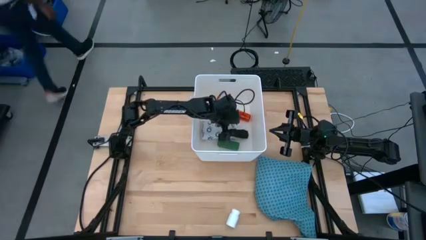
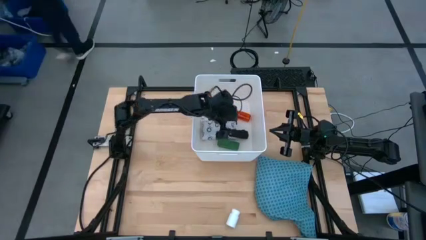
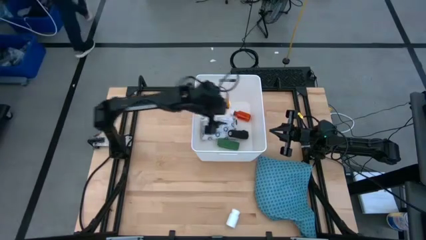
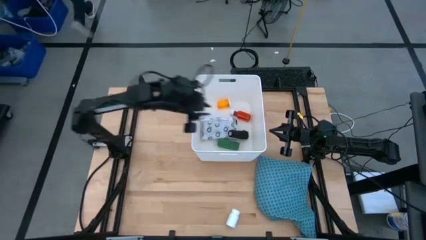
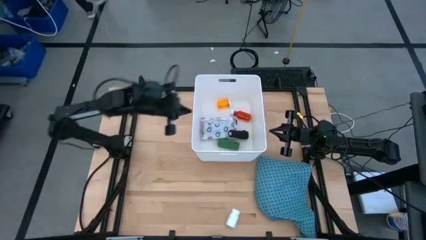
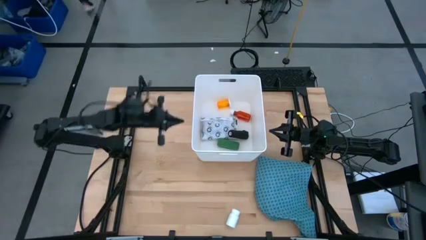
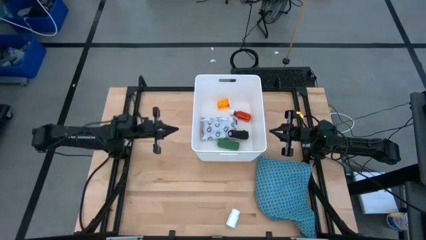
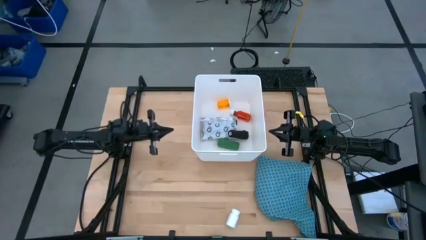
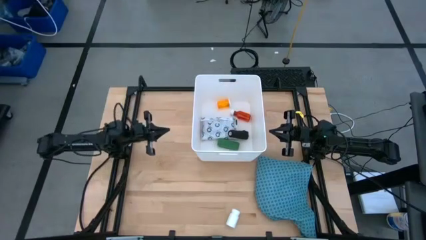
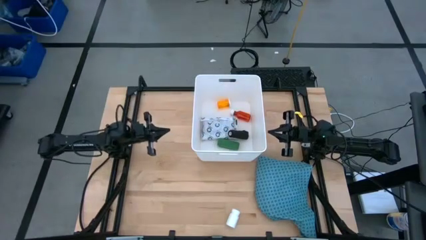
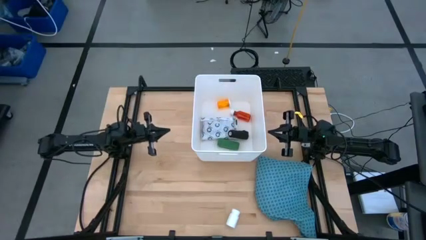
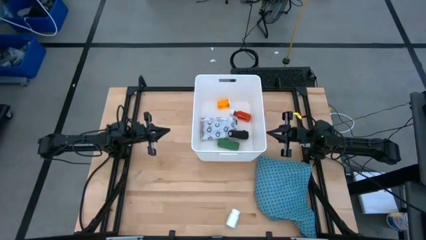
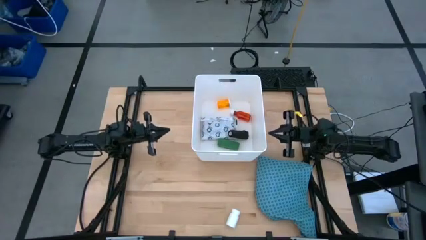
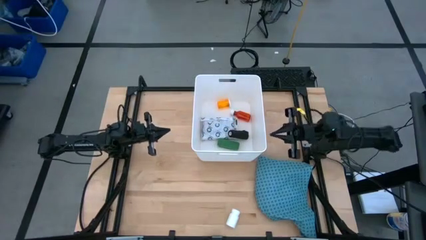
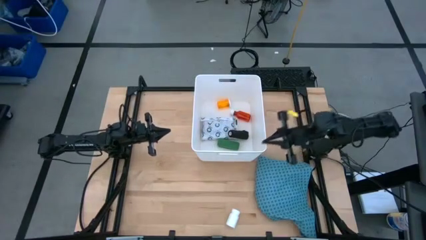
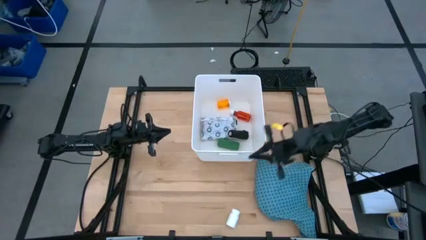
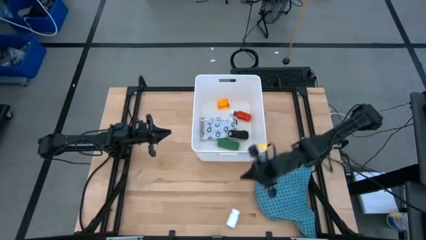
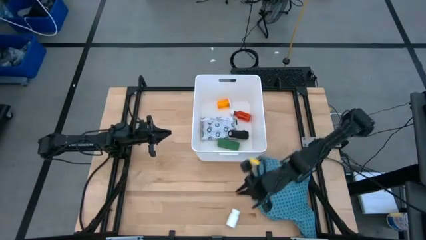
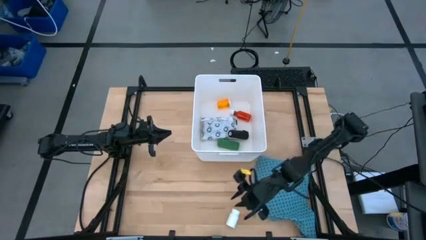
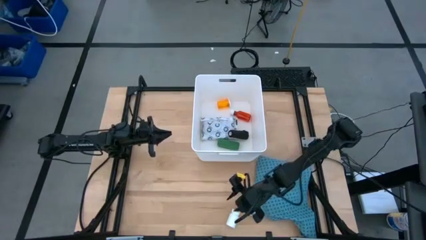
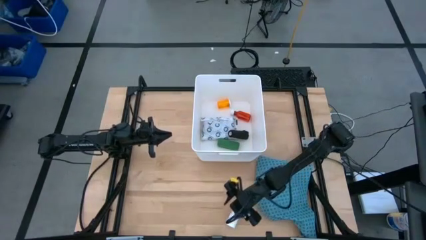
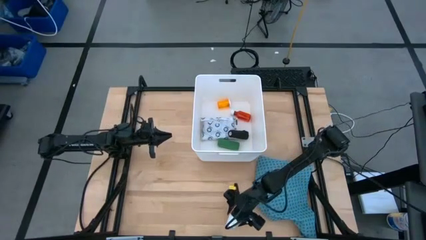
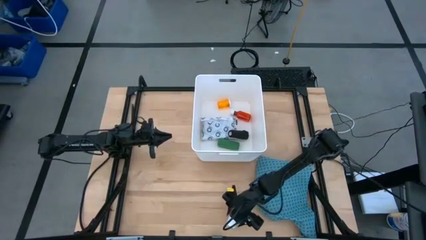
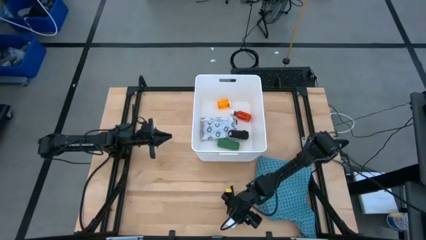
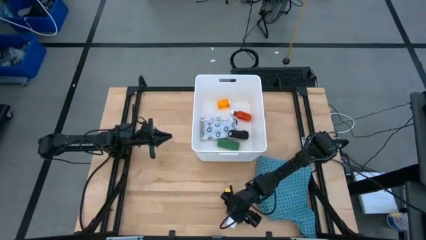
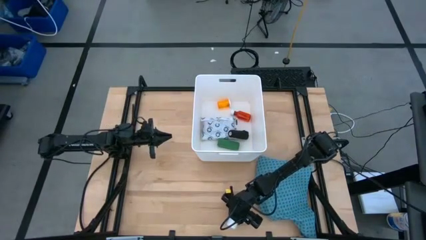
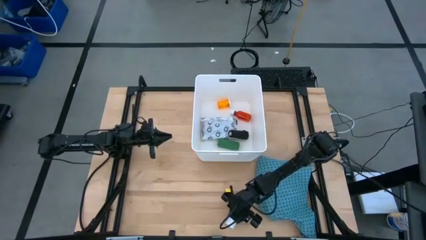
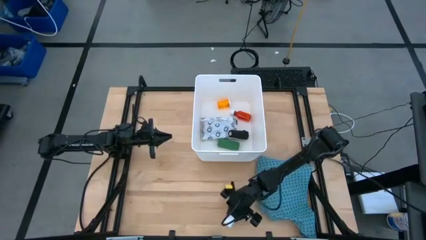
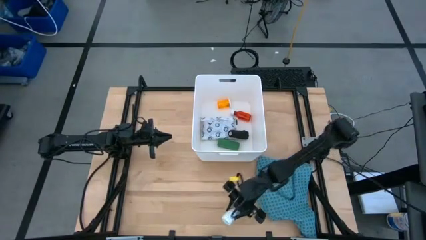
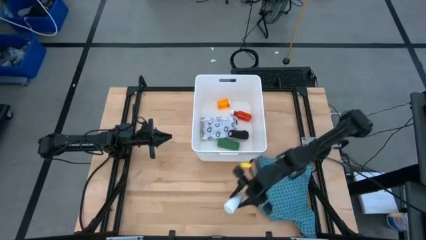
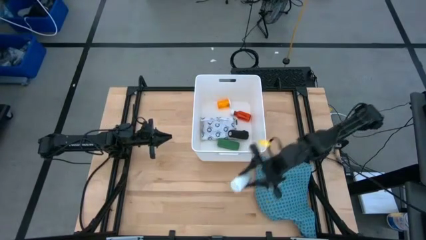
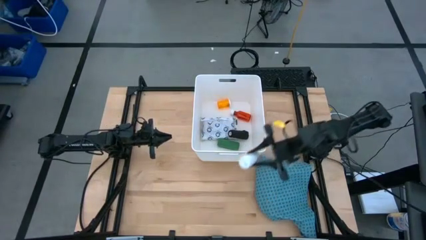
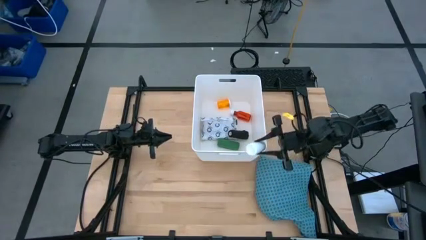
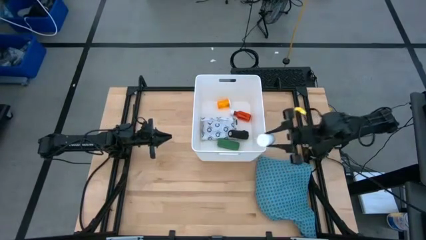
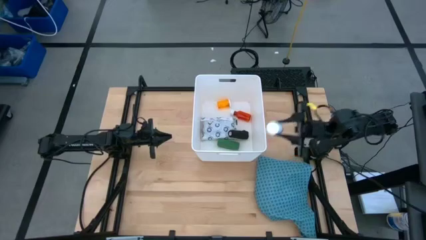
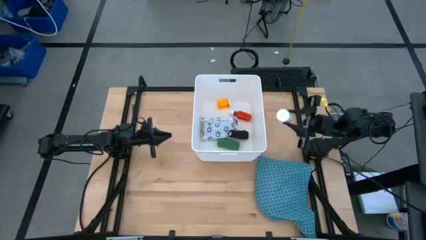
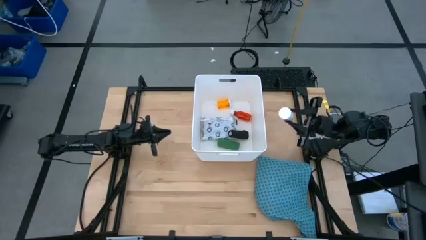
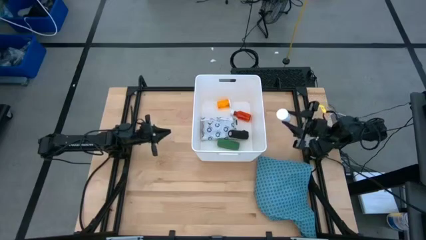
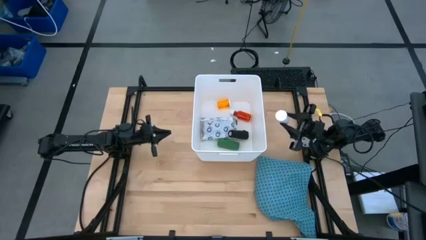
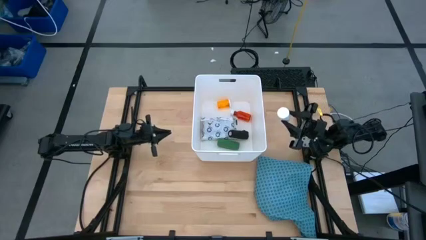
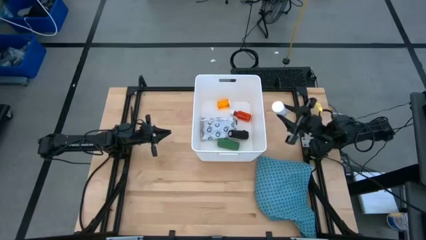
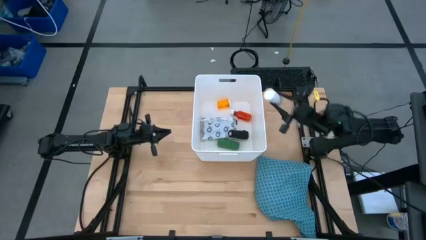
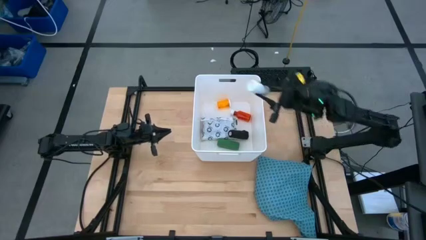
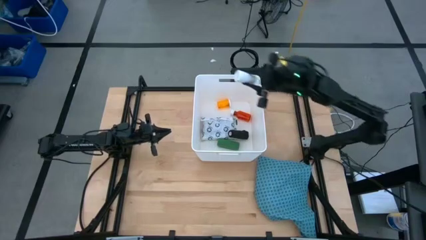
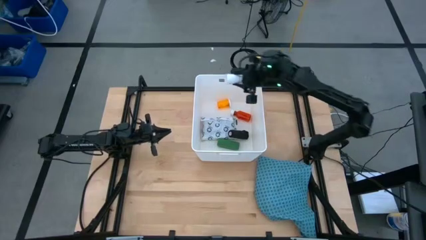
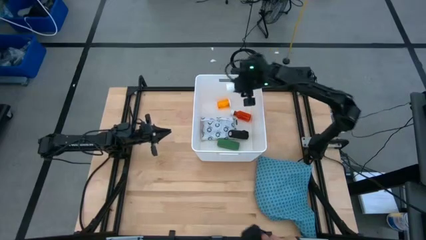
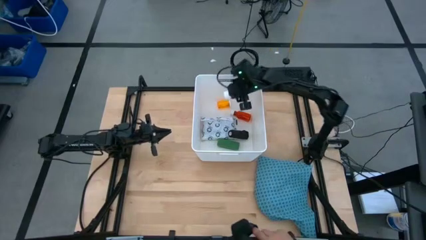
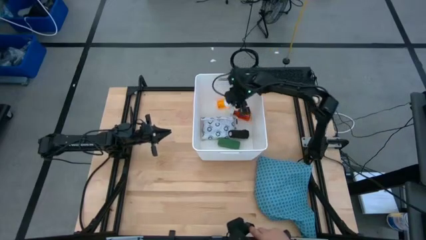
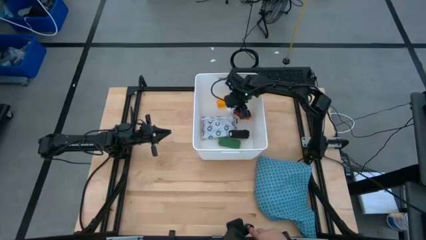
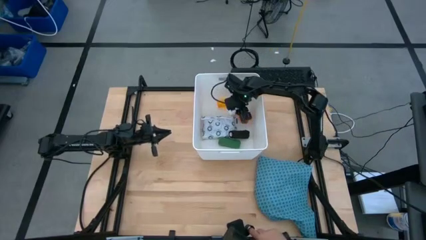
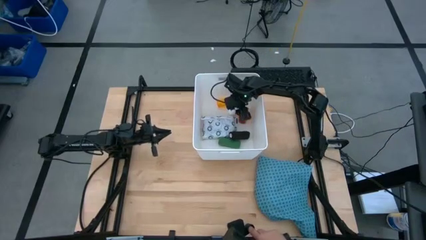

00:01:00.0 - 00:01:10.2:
Task: Pick & place medical supplies in basket/bin
Put the white pill bottle into the white bin

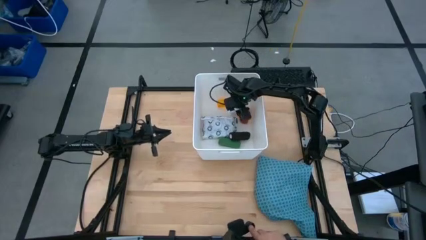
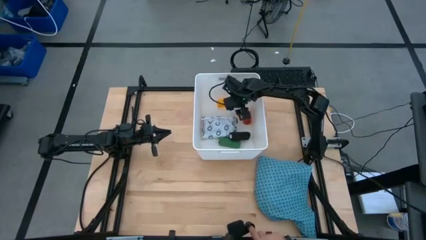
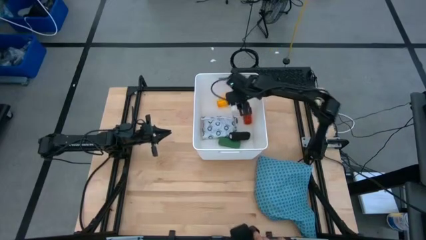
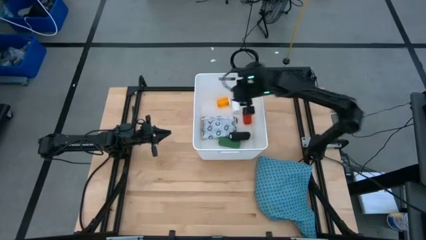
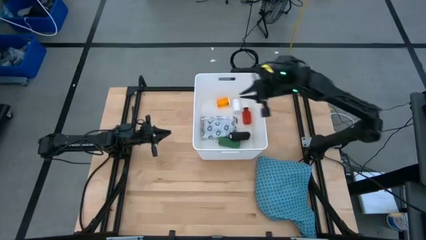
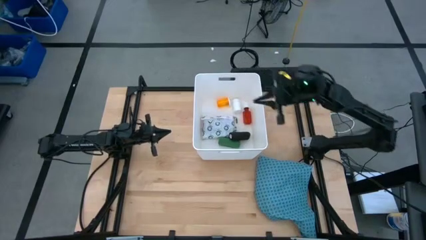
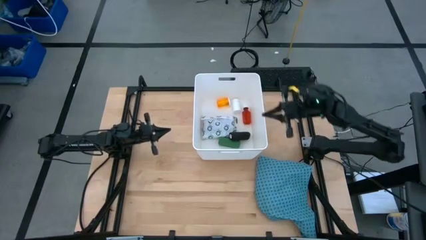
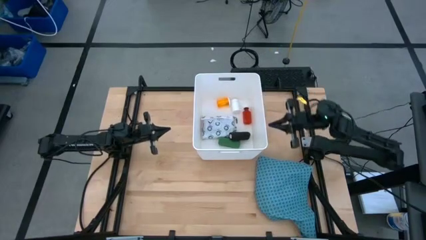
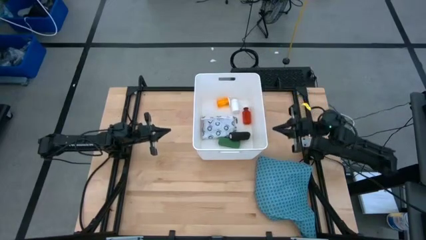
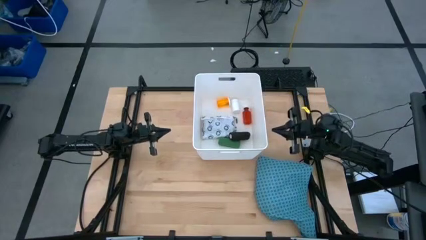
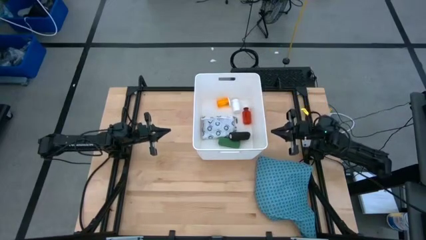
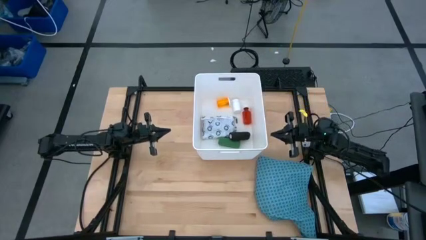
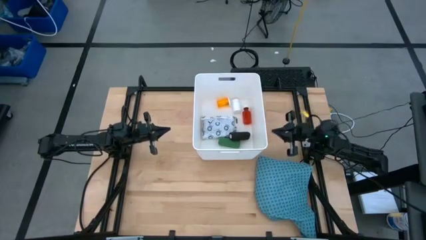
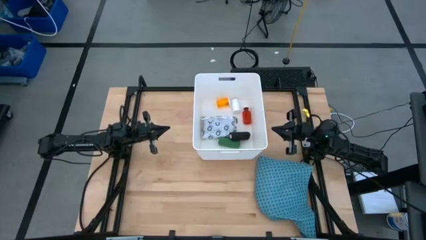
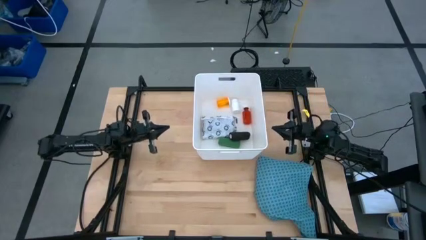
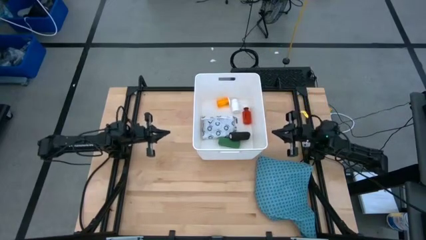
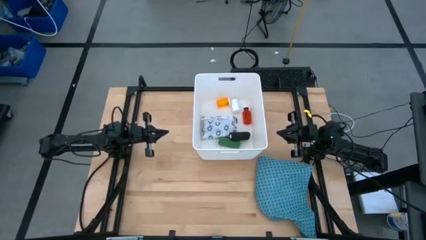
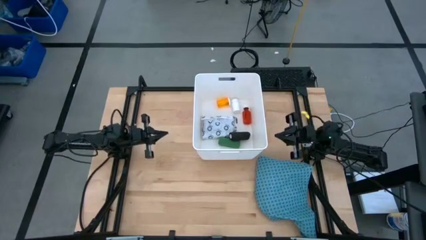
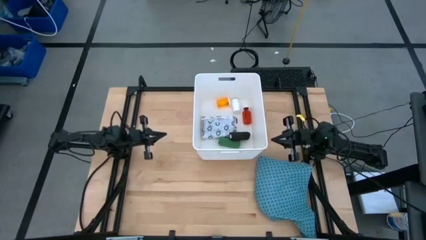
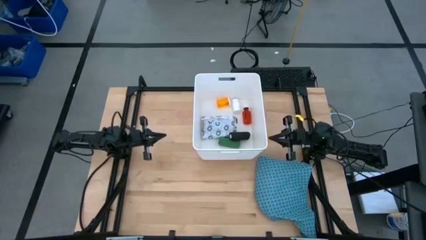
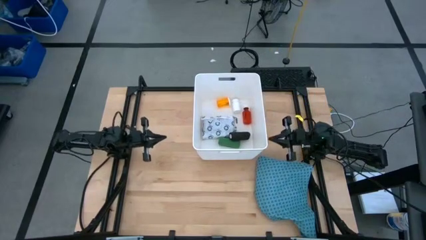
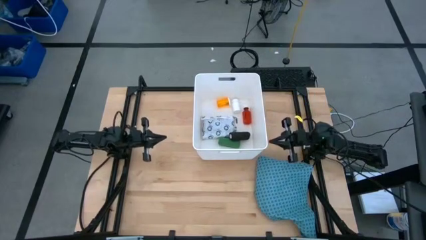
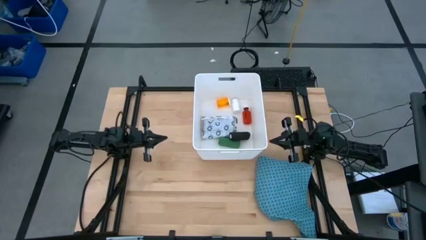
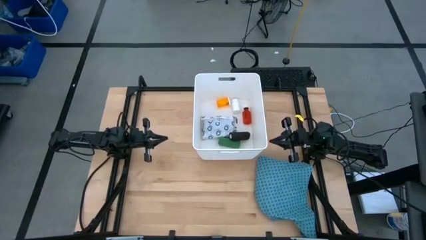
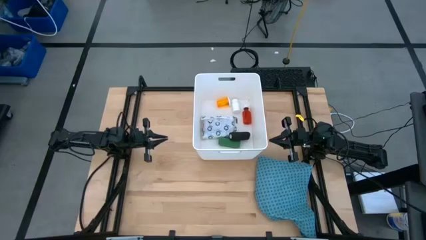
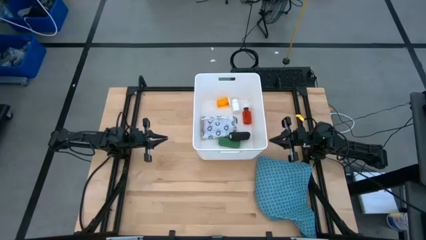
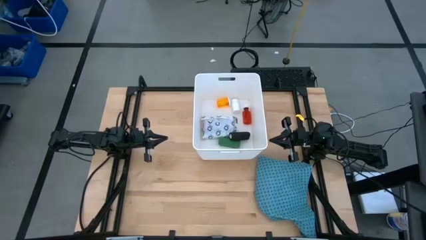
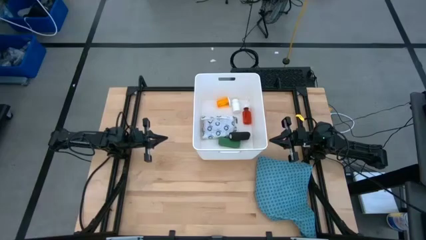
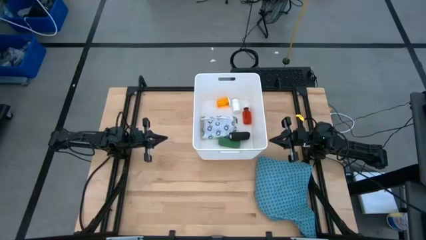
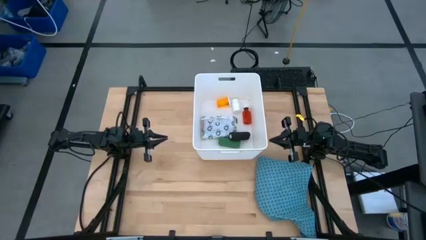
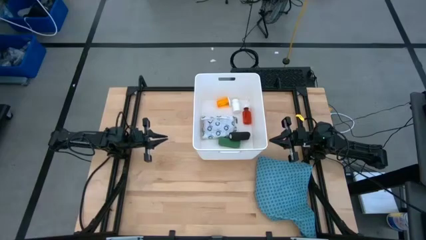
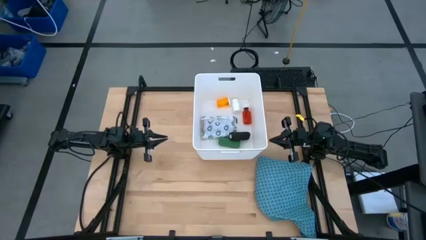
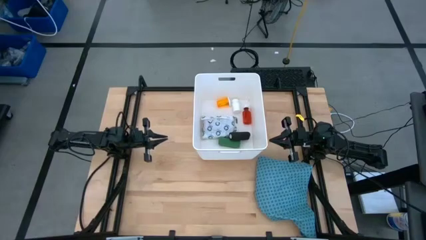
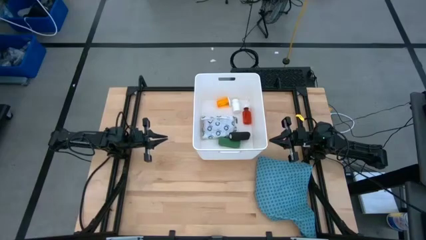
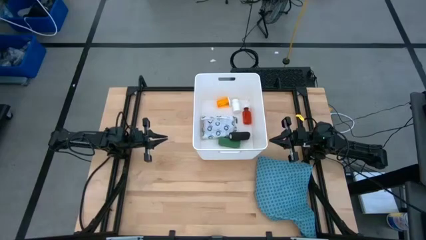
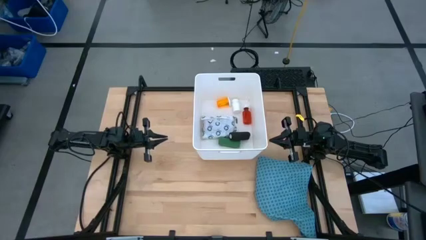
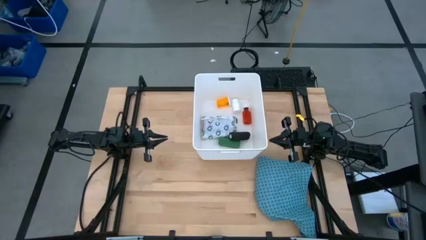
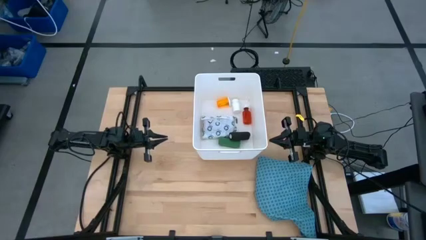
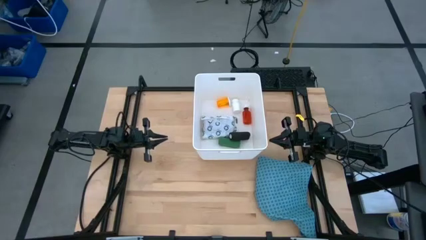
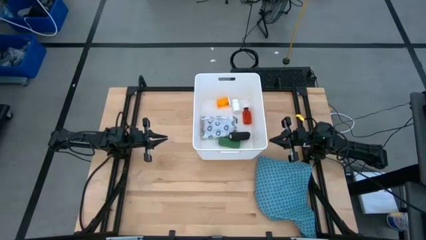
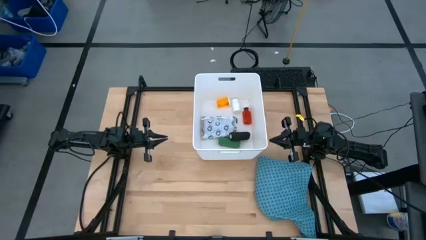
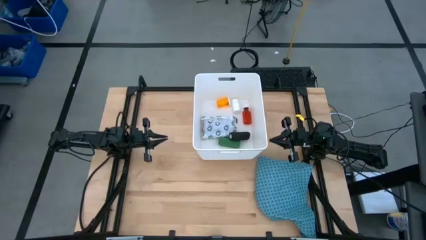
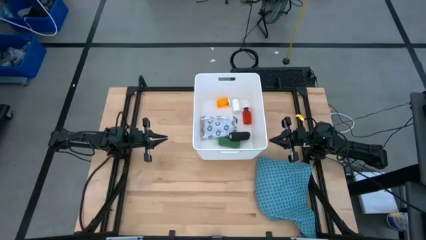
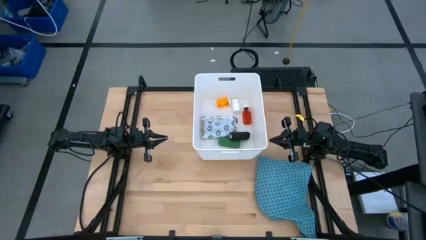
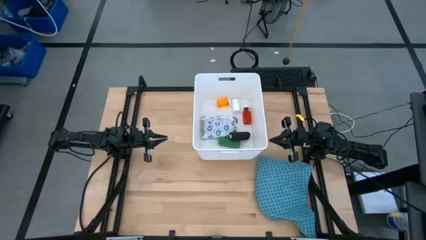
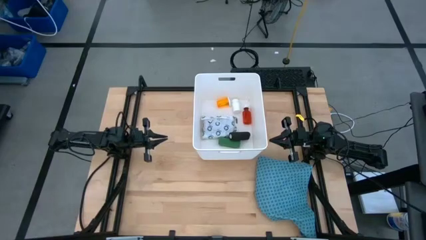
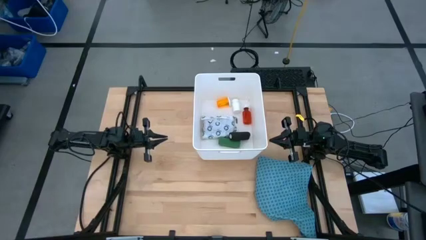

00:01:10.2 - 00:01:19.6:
Return to Home Position
